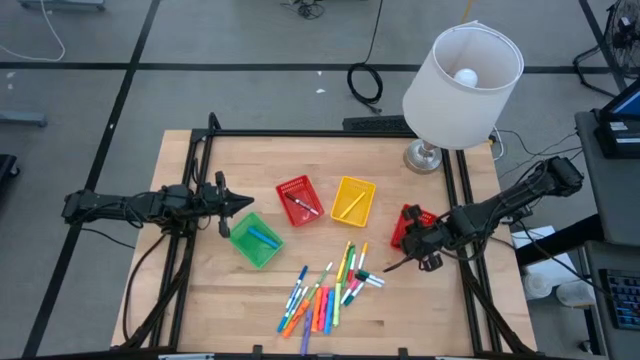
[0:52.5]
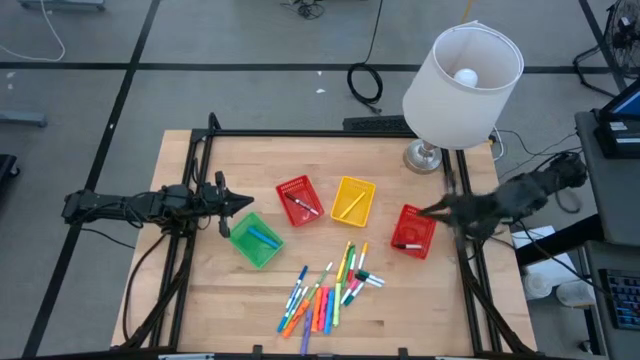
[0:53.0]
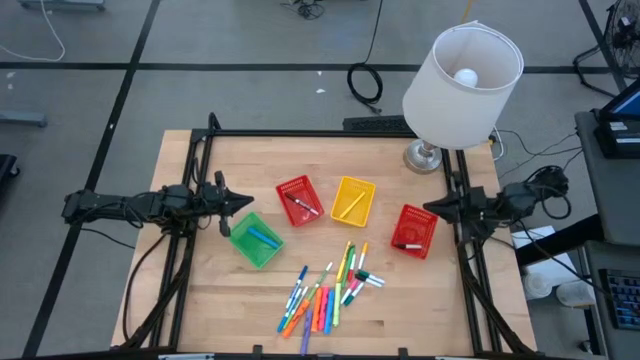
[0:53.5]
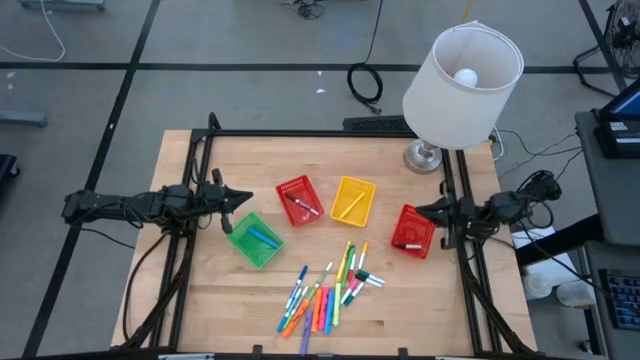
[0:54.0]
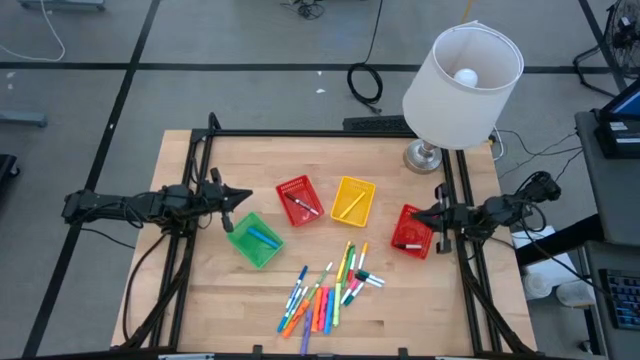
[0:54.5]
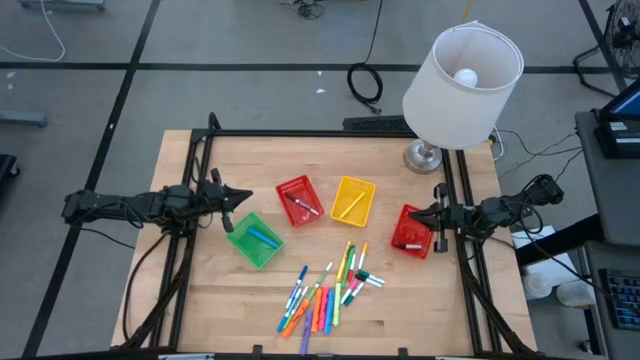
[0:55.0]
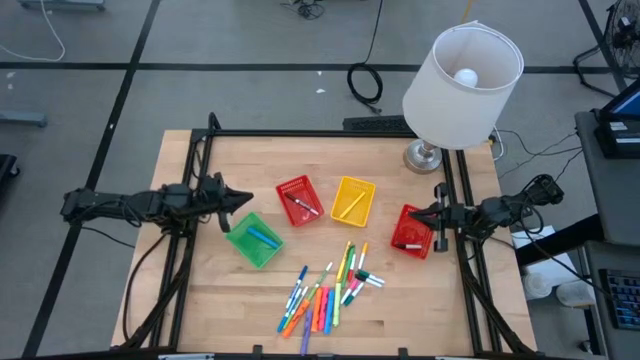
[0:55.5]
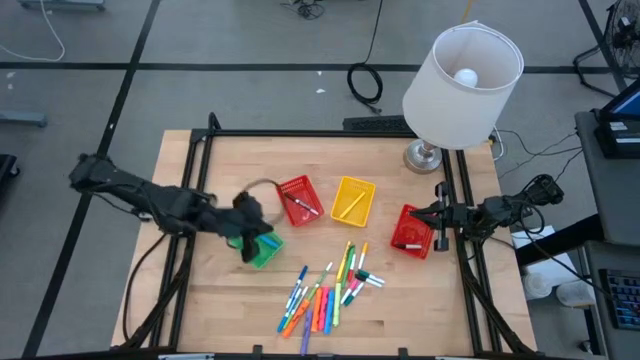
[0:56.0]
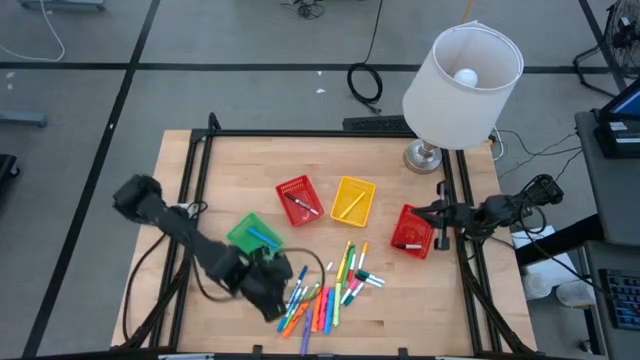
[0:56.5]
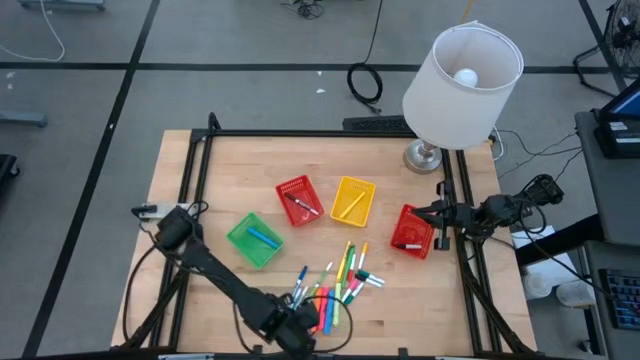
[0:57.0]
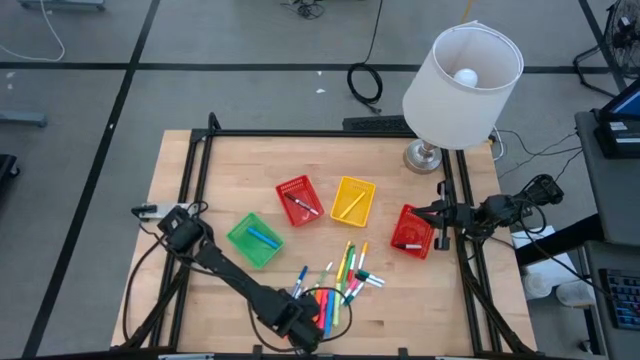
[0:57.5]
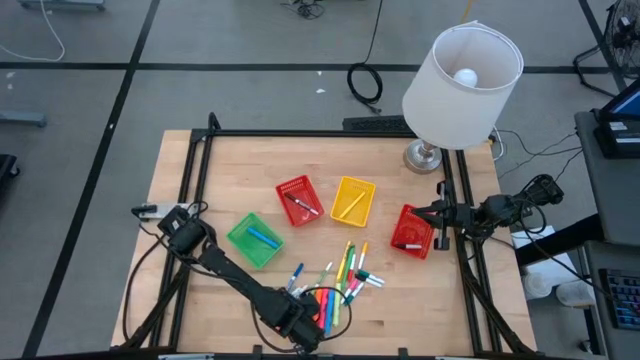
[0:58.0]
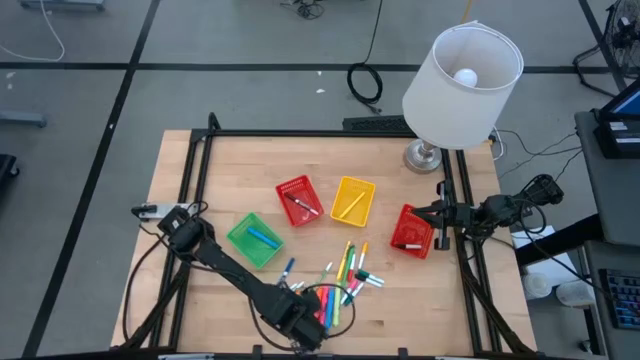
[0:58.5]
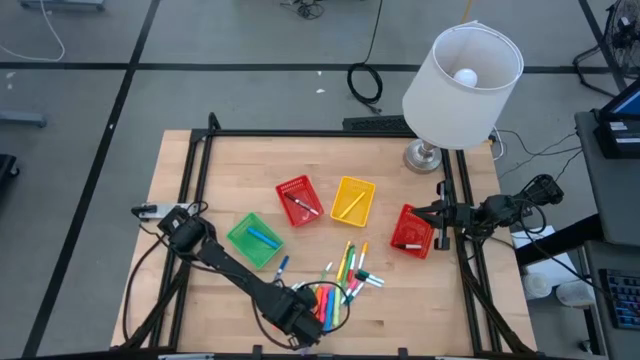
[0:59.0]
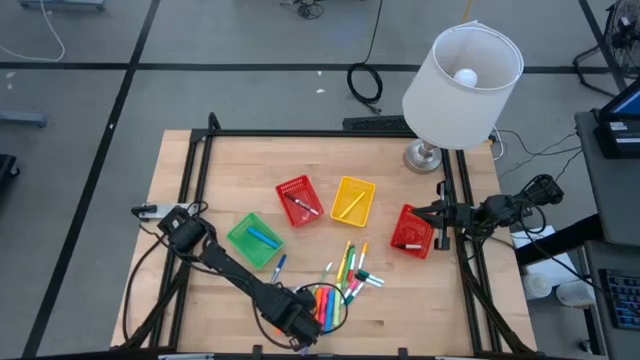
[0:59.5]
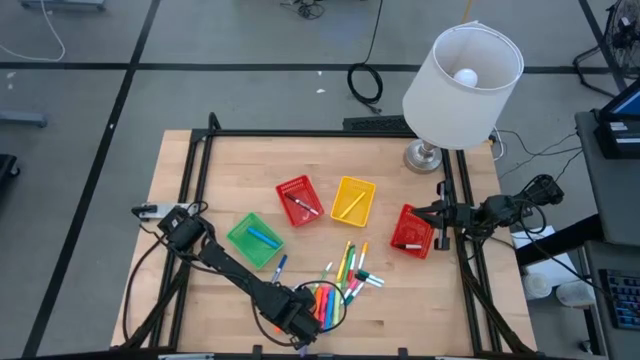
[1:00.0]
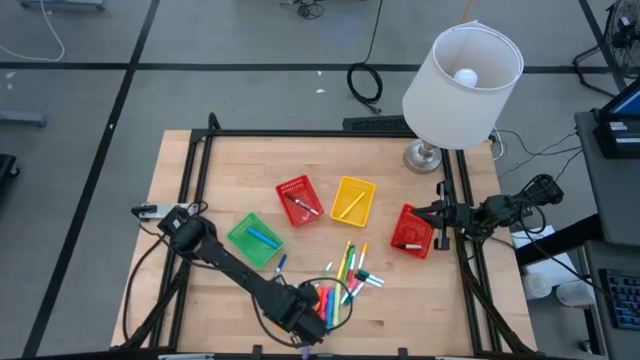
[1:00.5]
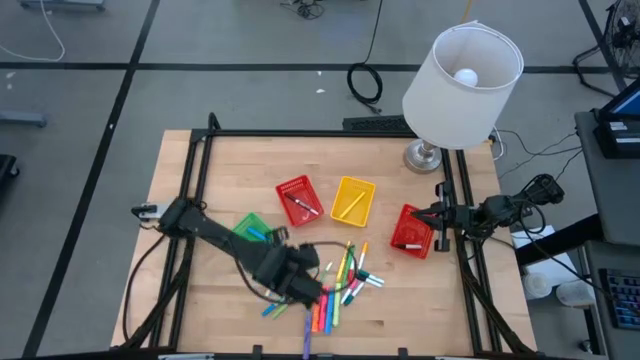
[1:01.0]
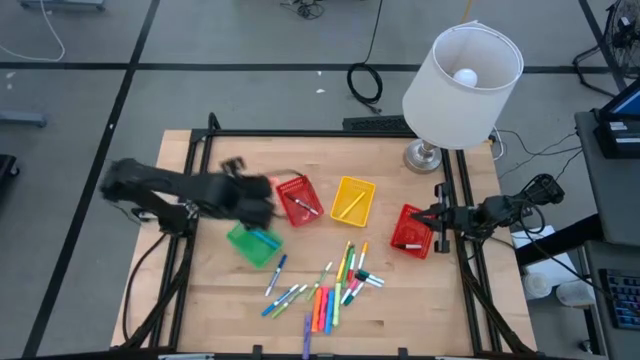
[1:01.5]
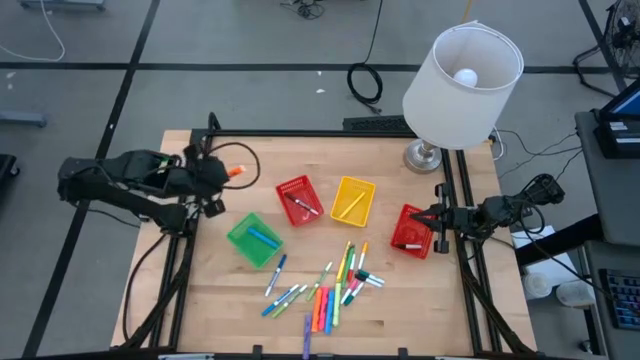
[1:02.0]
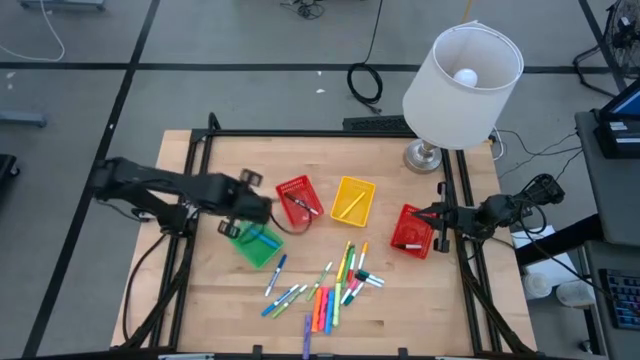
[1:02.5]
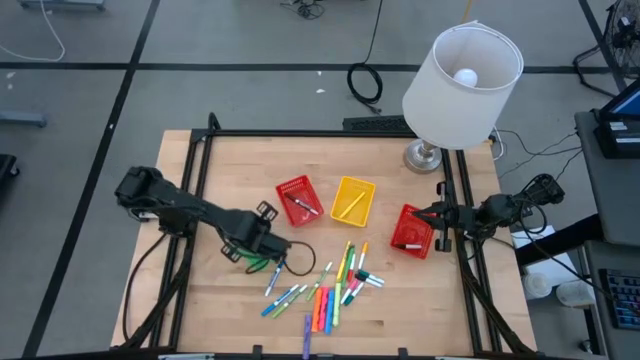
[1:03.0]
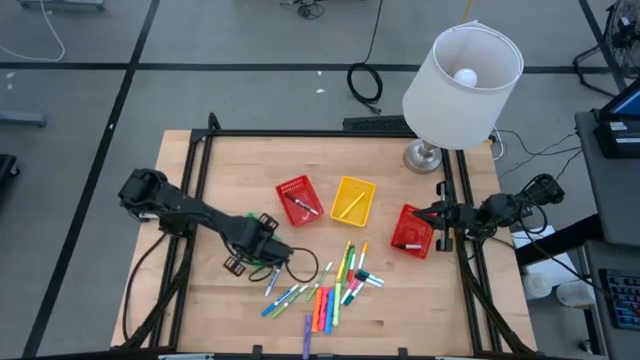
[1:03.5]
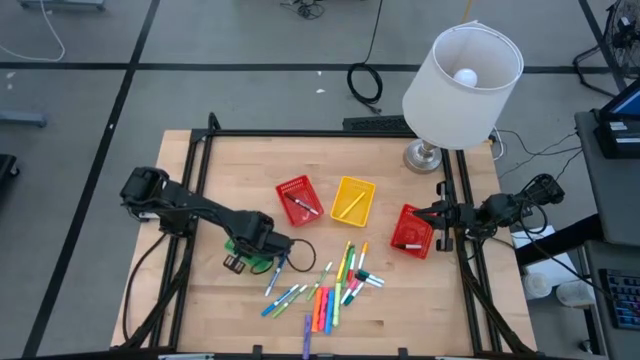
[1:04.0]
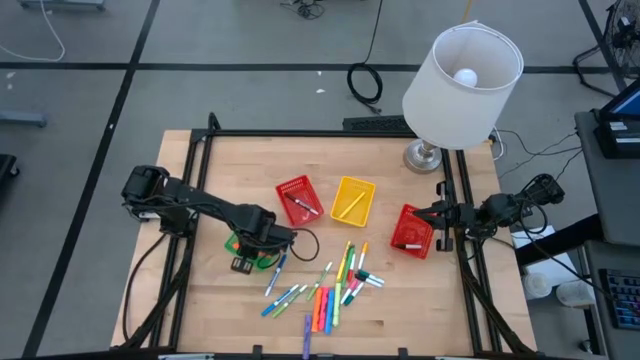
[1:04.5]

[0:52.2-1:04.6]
Task: Pick & Place Markers
Put the left orange highlighter into the green bin

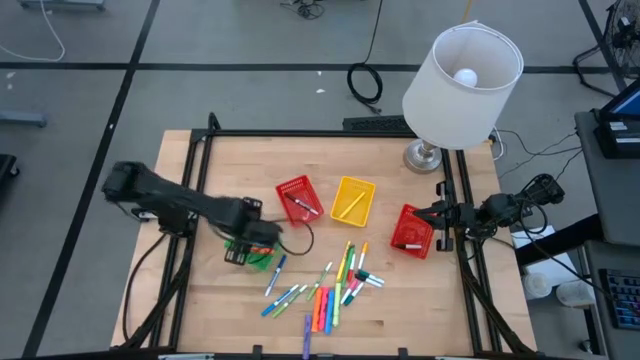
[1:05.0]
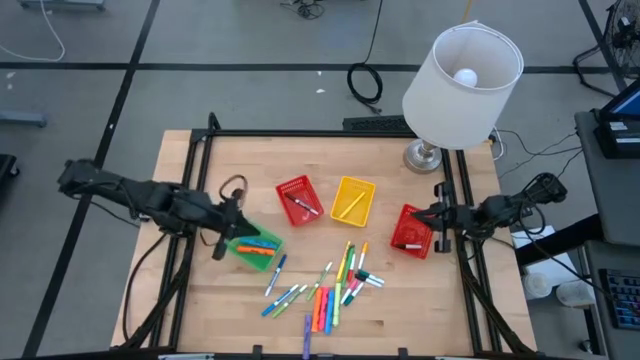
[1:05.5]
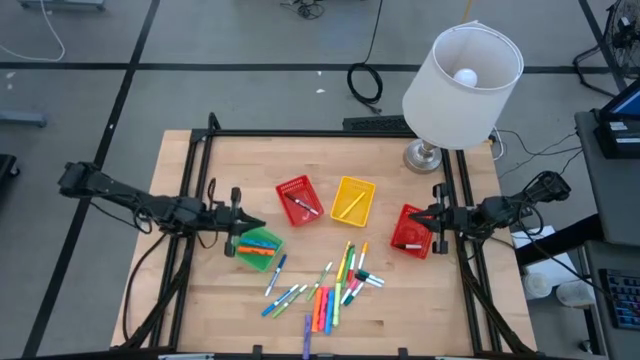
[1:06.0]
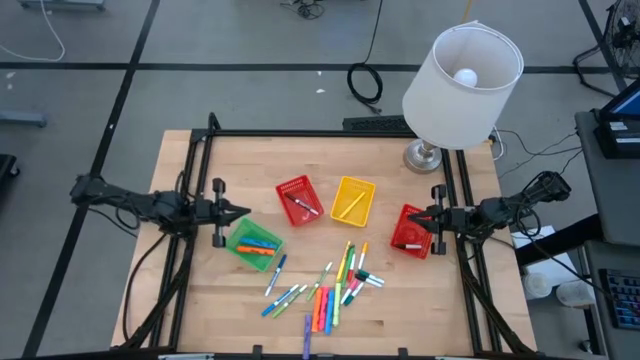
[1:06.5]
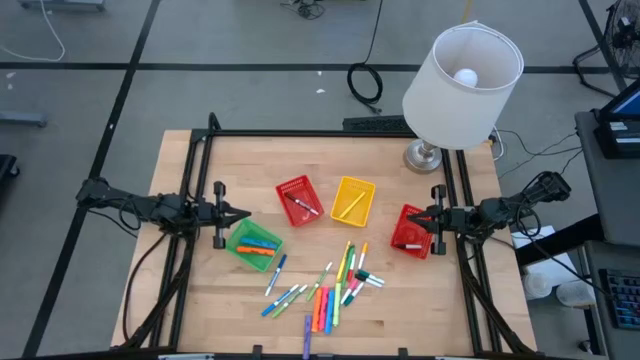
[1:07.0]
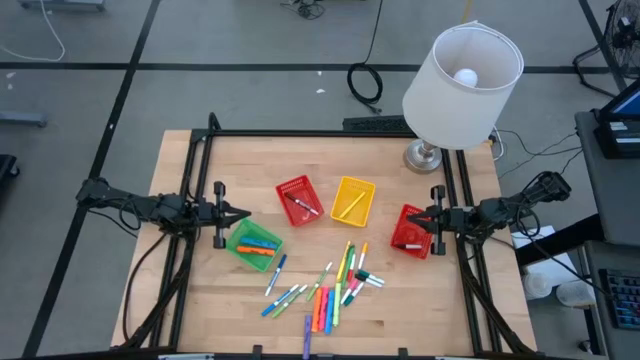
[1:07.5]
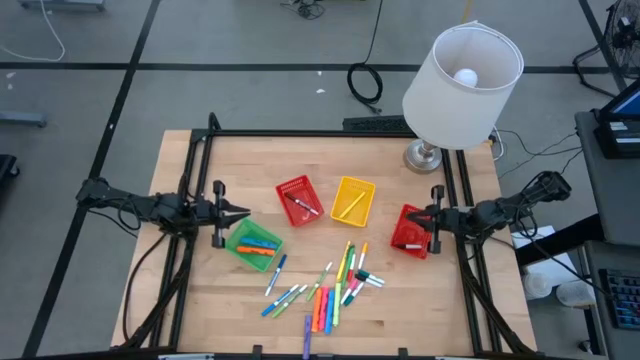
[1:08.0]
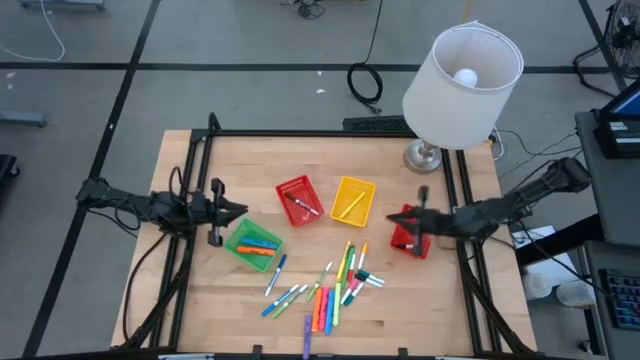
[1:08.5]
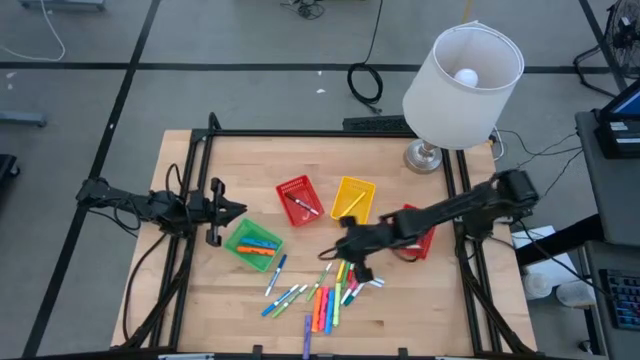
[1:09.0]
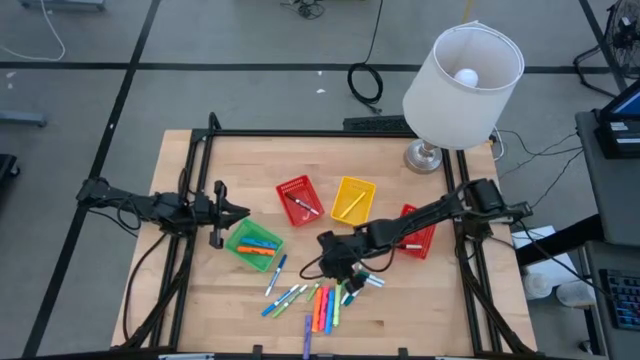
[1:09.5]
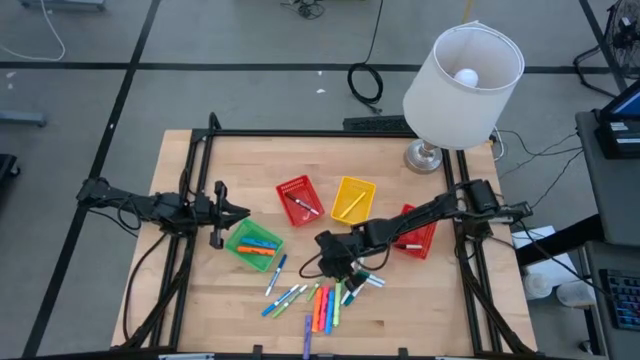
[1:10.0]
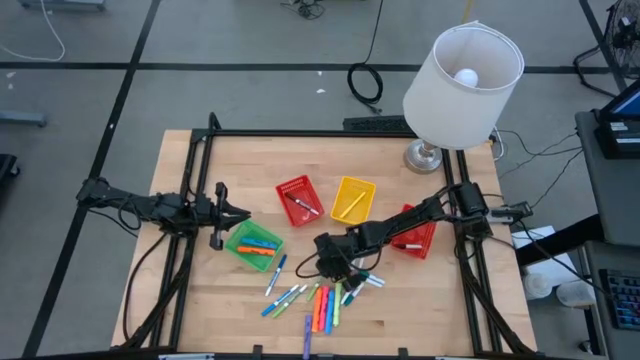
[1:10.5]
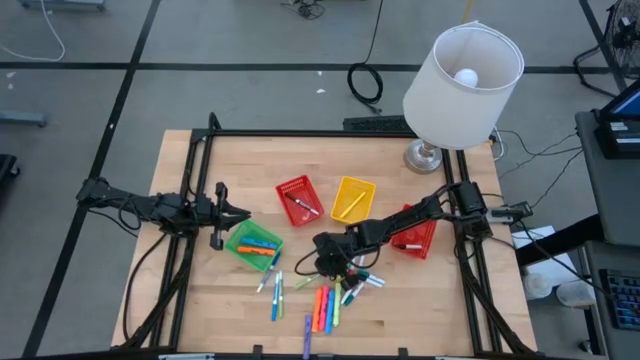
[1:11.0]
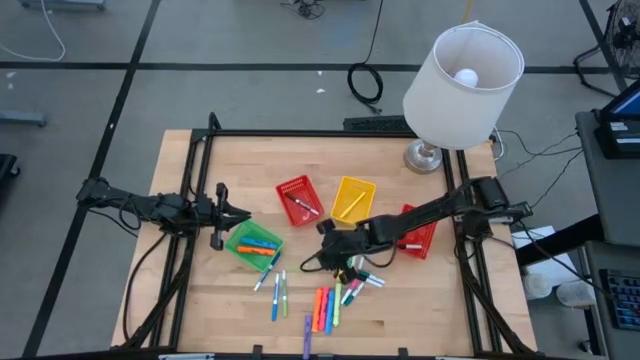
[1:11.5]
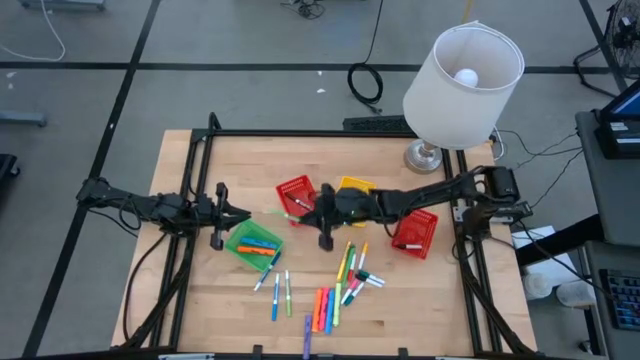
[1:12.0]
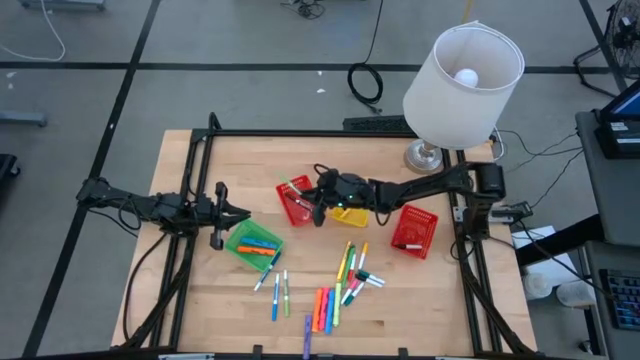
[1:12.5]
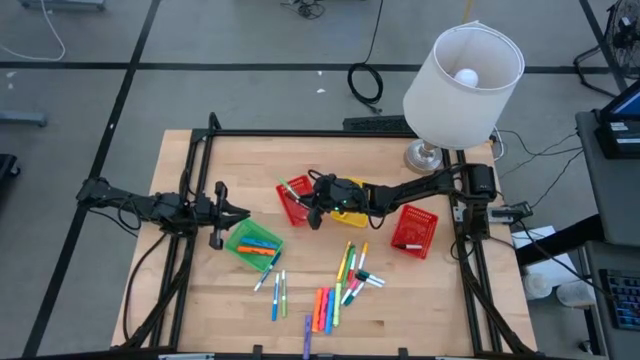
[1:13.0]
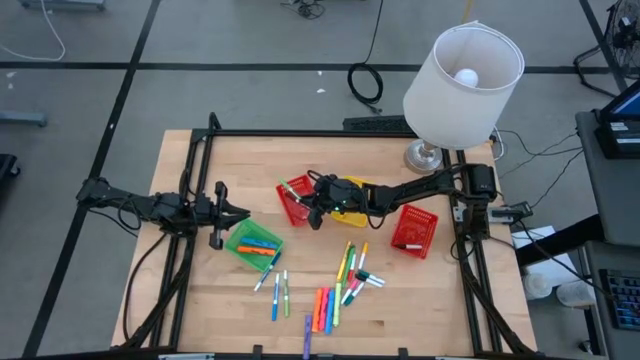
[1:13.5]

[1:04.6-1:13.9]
Put the right green marker into the left red bin

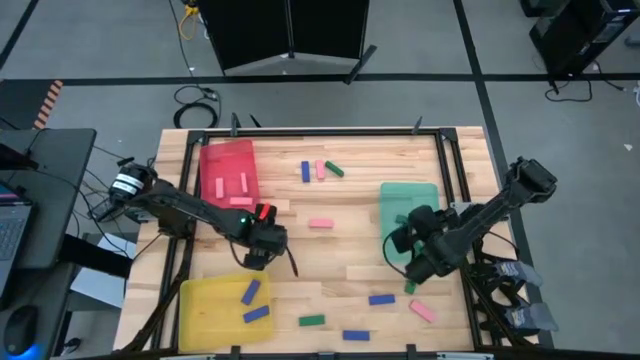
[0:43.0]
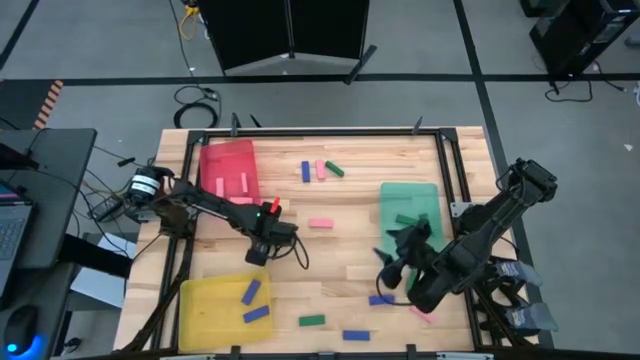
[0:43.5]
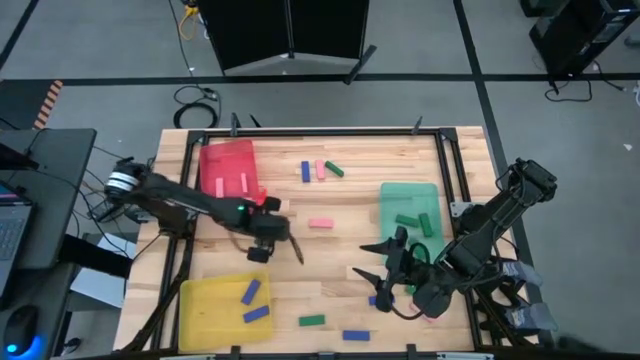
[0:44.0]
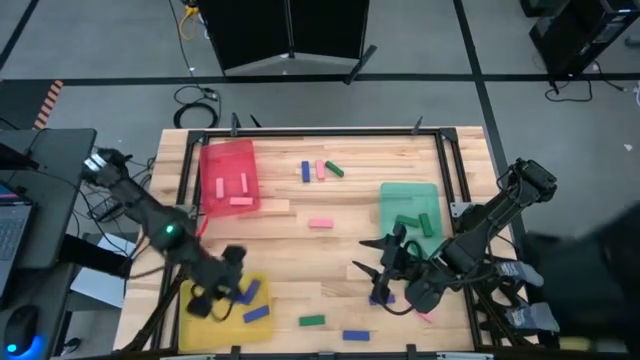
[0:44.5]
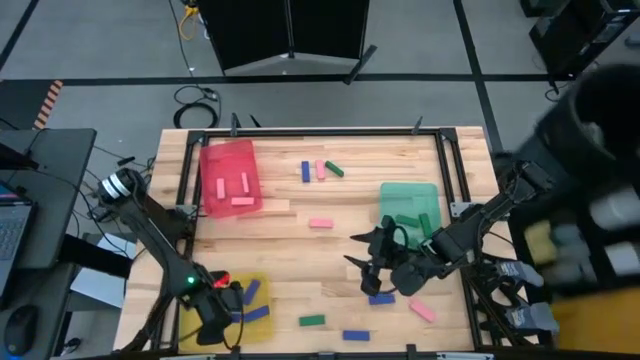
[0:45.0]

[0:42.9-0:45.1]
Task: Sort blocks
Put the blue block into the yellow bin
